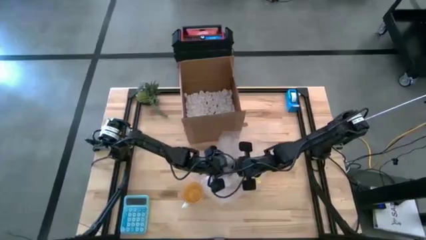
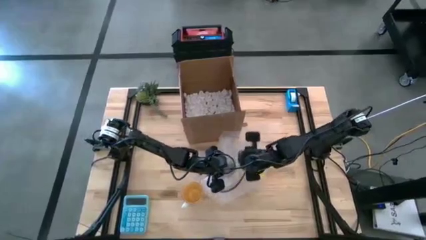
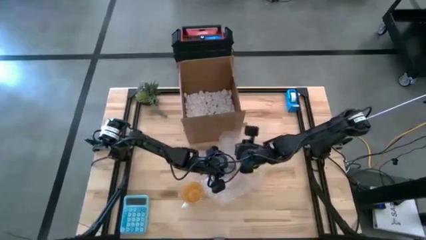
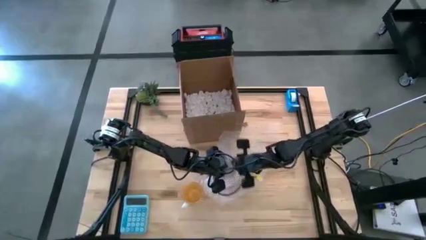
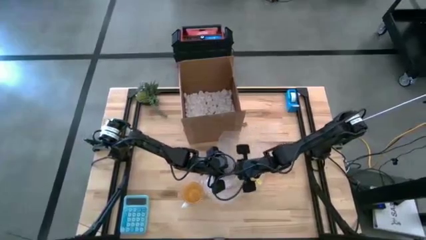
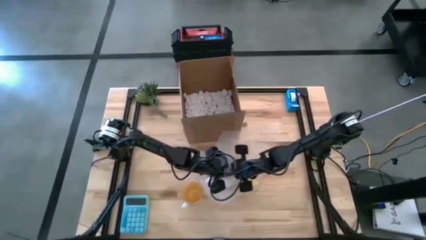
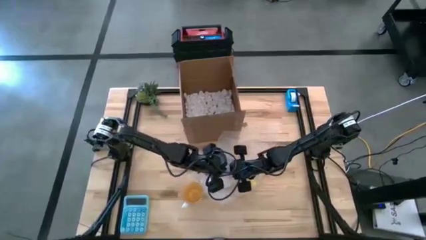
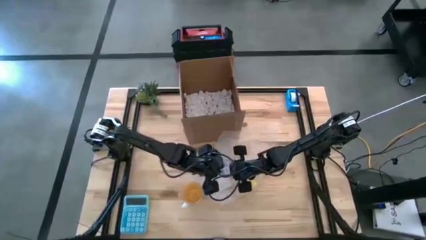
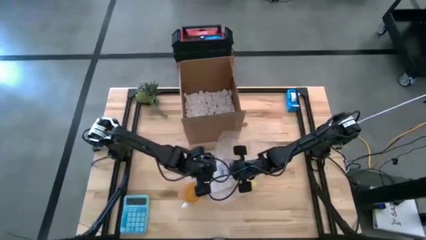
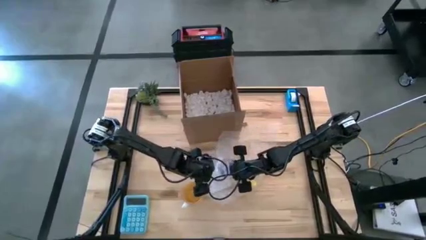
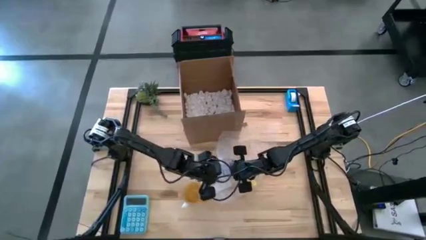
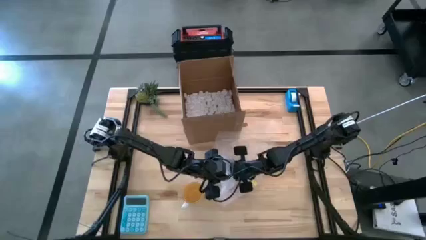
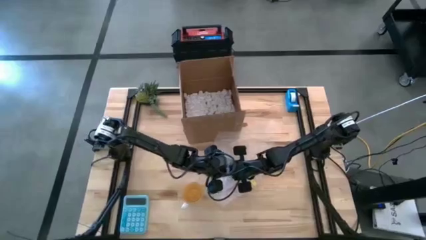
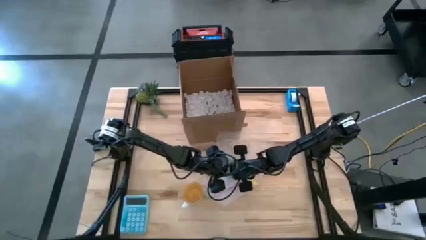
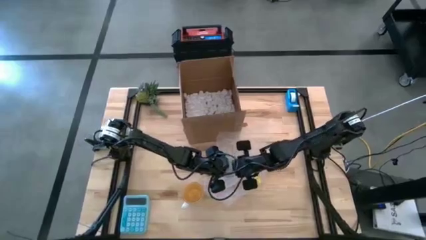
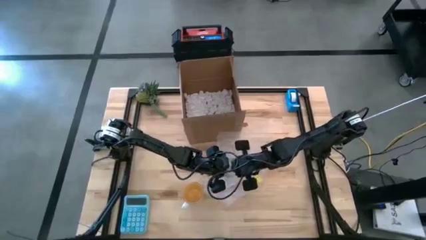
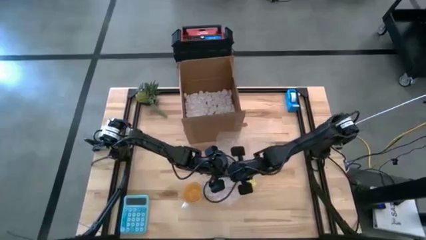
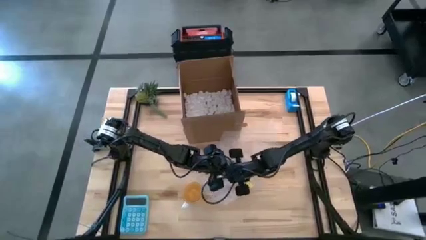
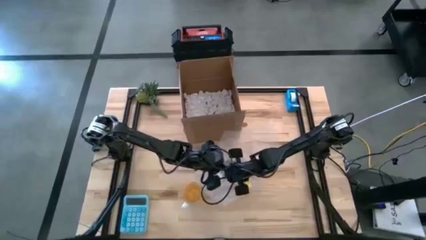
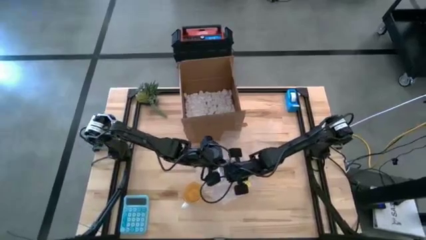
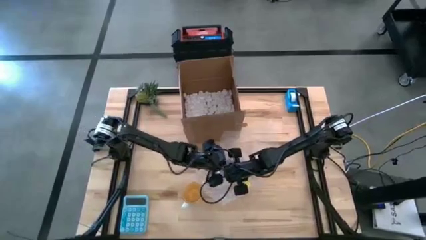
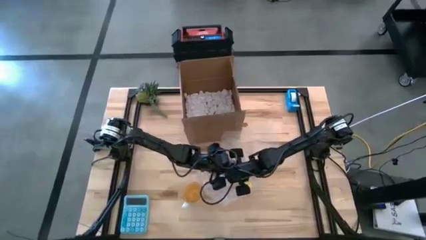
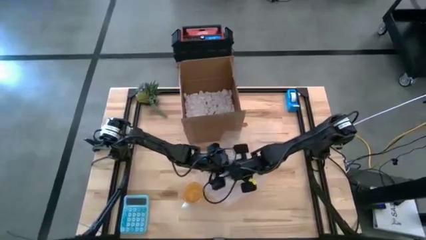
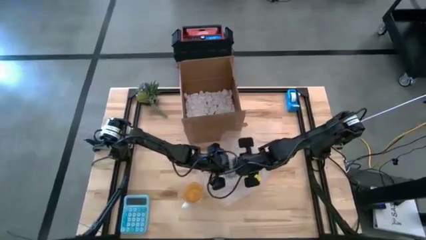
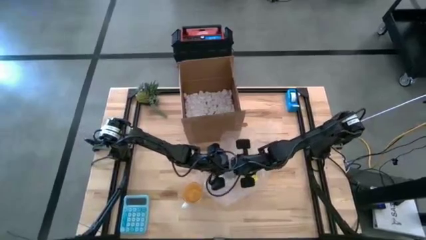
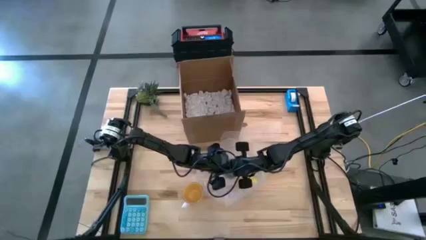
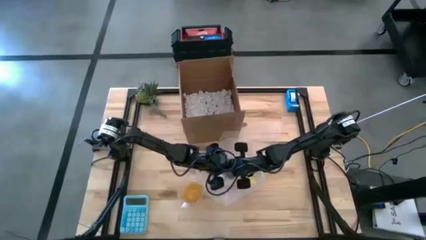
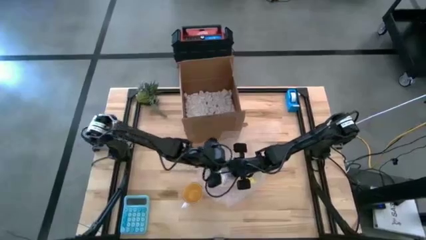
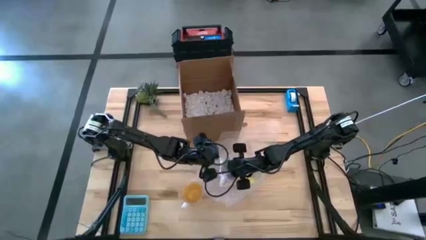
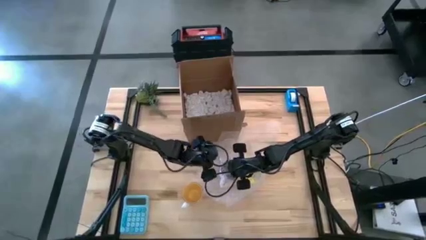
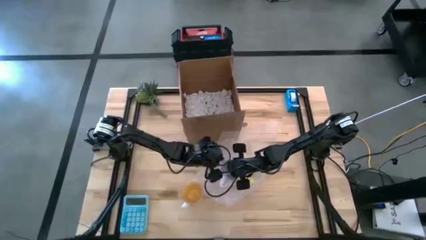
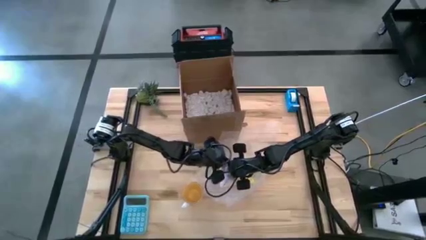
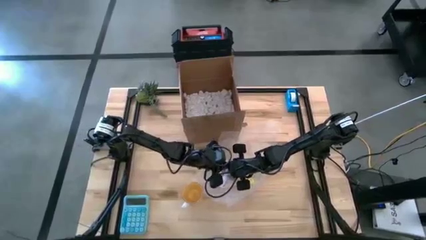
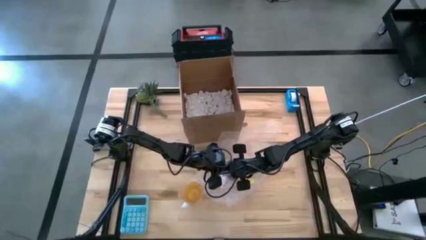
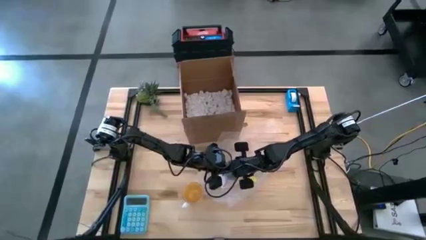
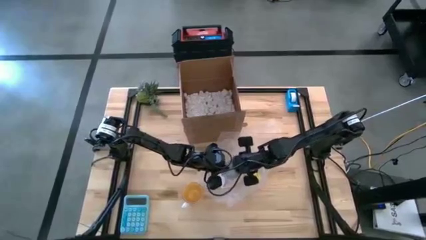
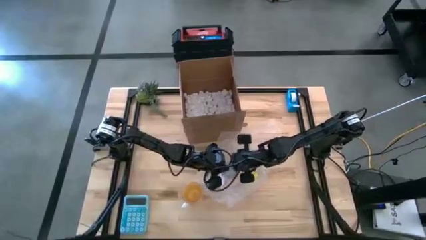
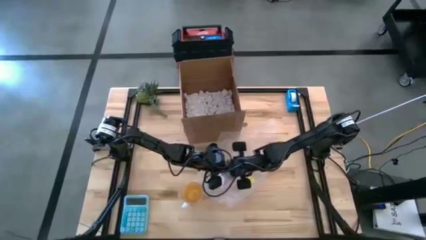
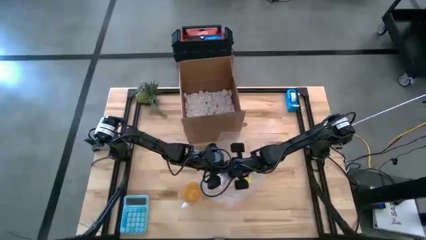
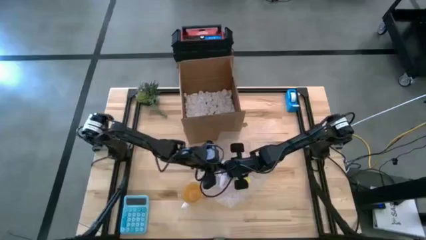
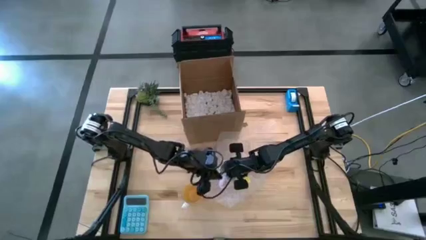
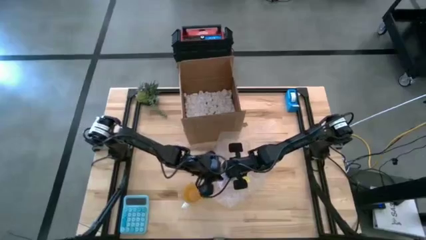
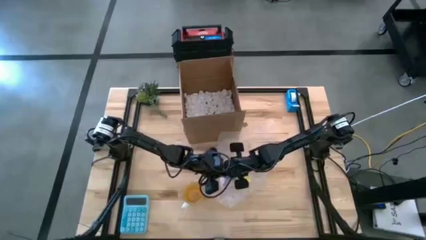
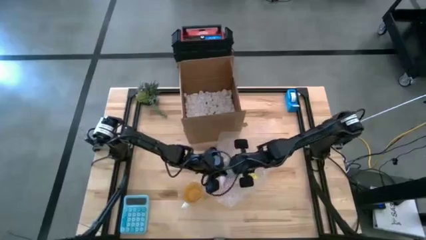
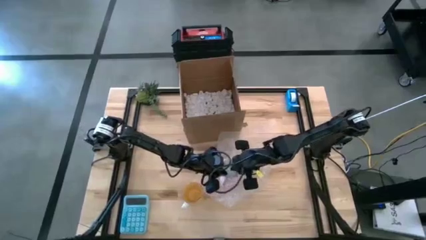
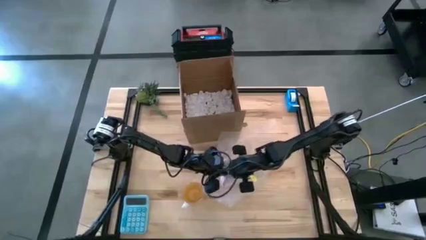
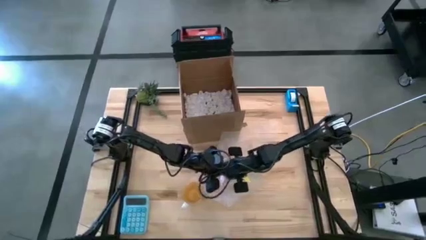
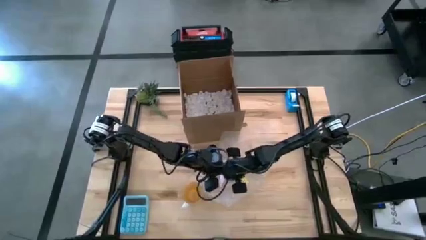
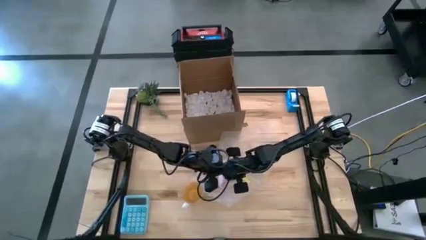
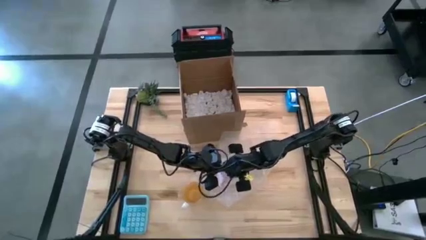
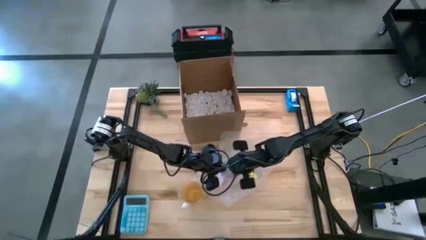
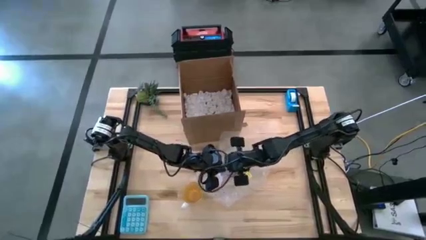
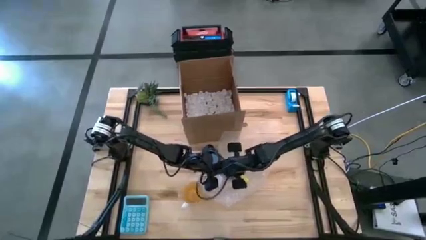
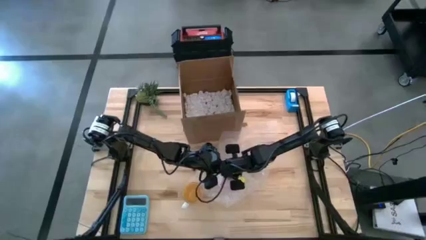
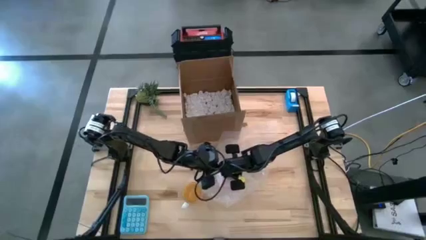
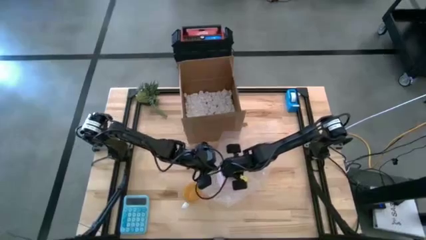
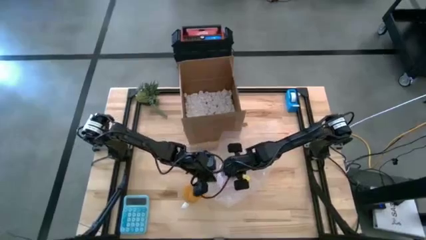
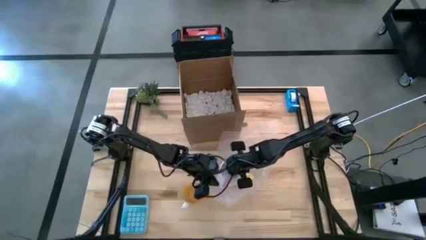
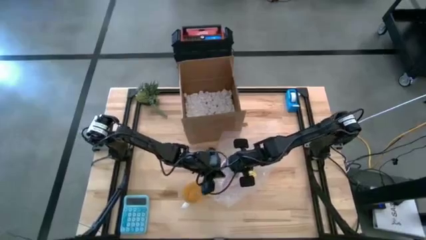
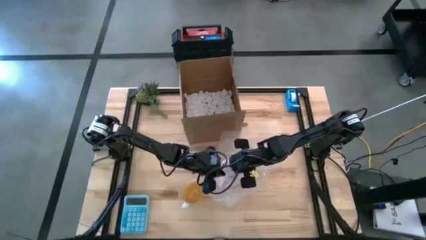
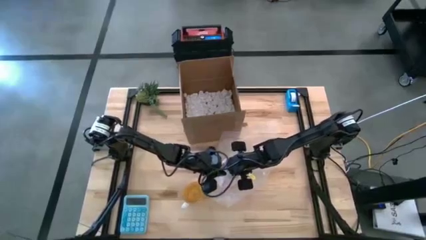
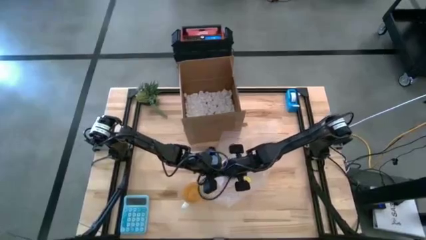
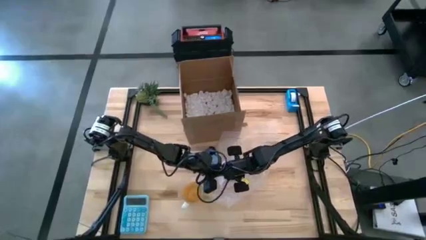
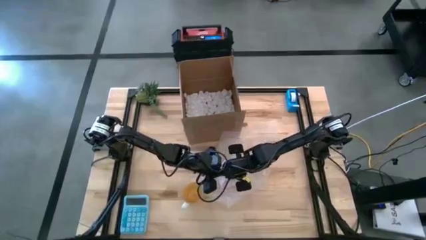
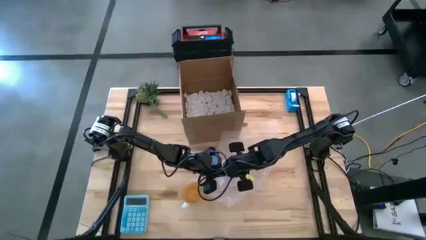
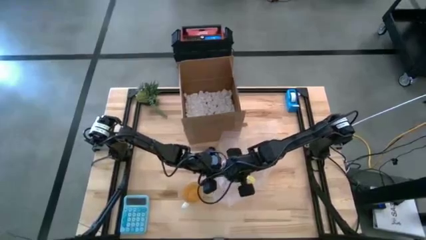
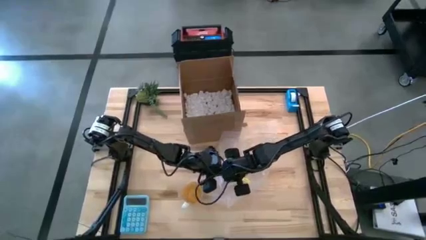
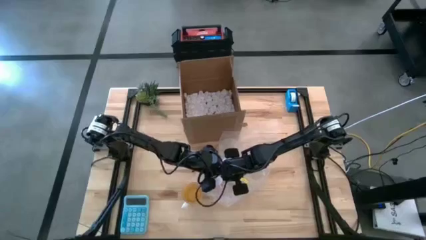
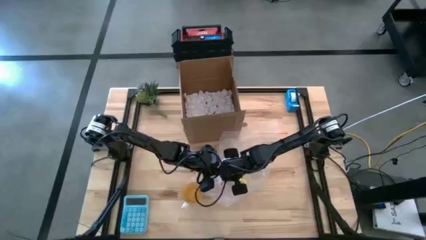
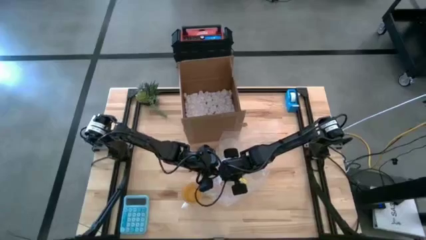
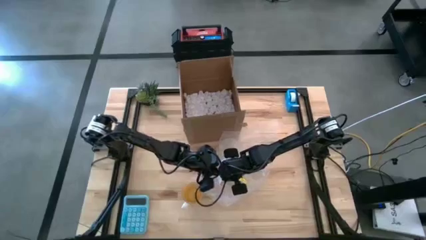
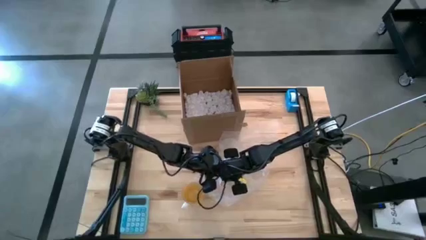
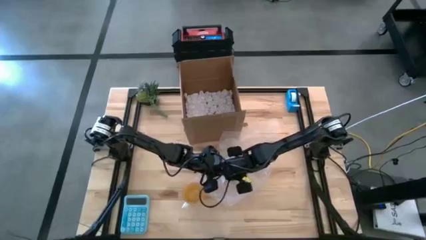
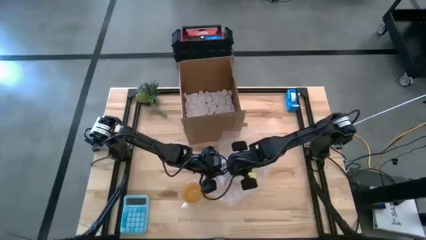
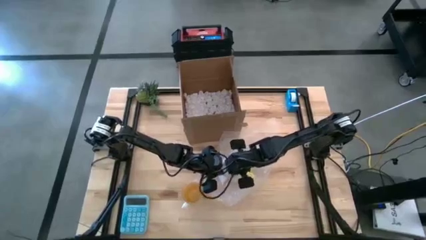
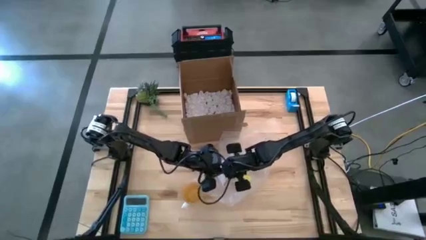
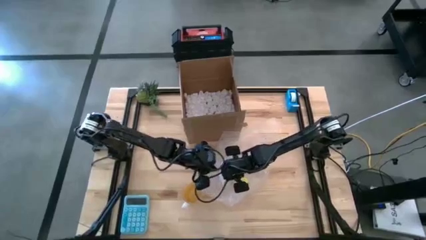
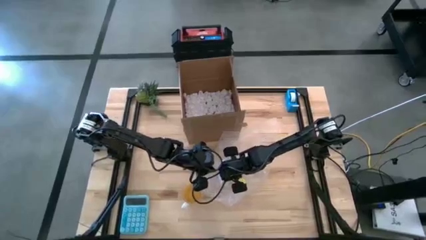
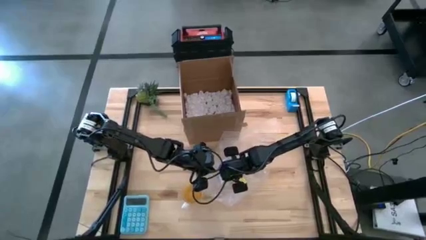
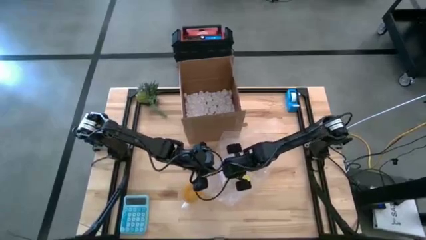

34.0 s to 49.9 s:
Task: wrap mug
Wrap the orange mug with bubble wrap
